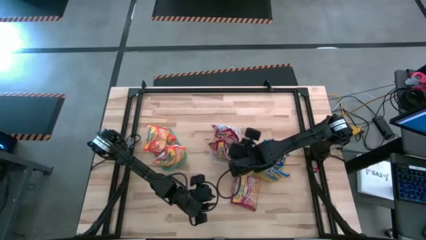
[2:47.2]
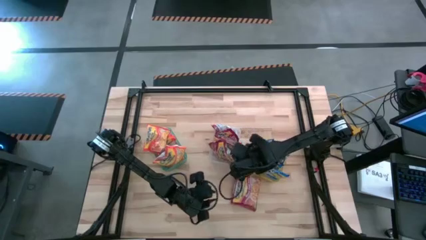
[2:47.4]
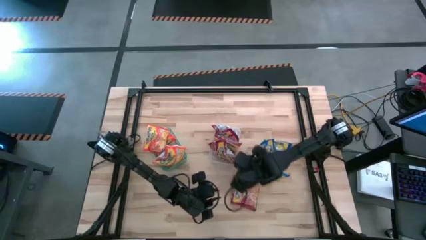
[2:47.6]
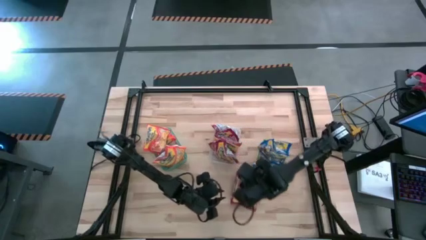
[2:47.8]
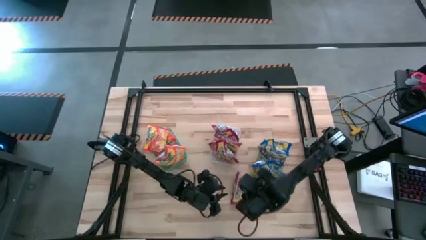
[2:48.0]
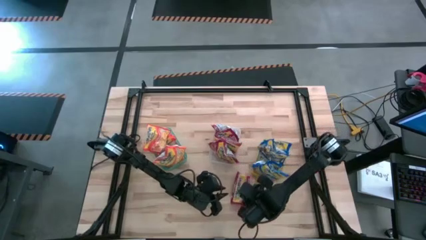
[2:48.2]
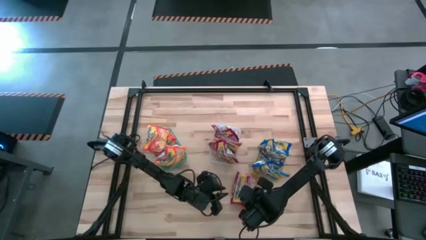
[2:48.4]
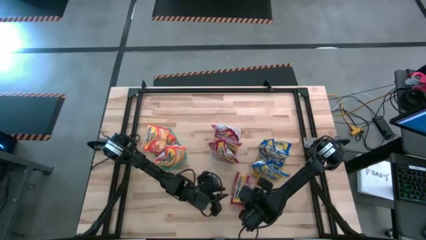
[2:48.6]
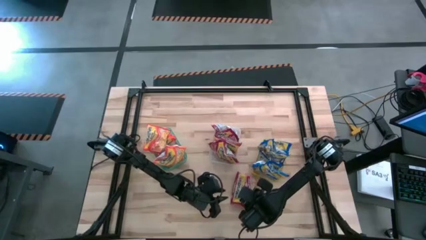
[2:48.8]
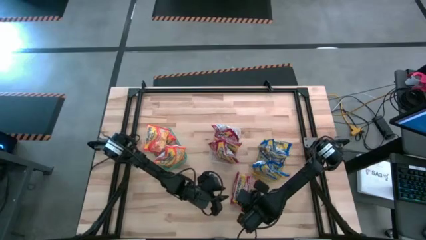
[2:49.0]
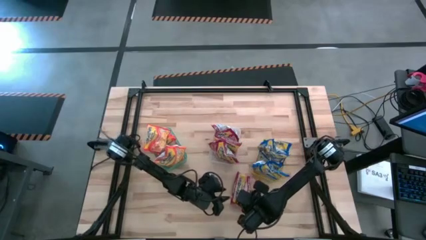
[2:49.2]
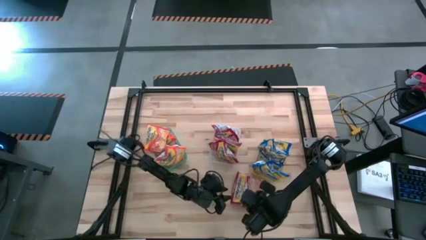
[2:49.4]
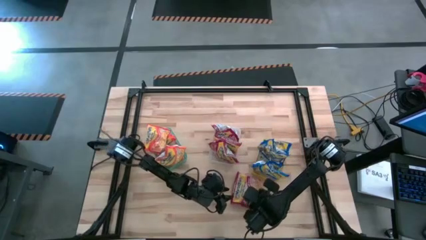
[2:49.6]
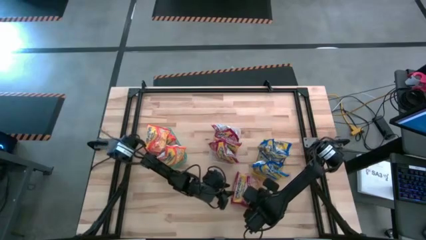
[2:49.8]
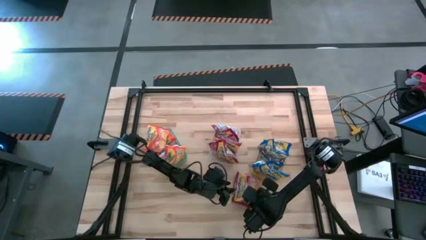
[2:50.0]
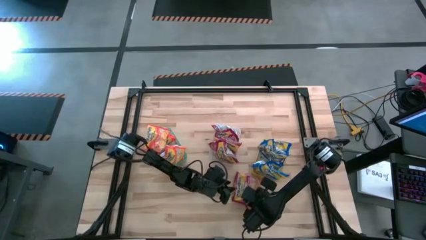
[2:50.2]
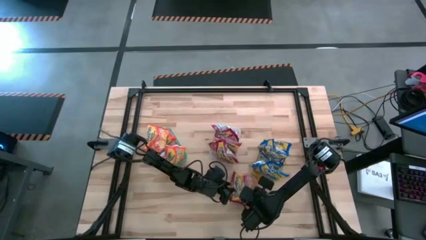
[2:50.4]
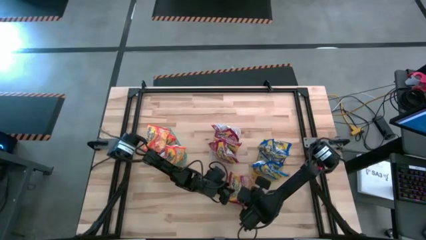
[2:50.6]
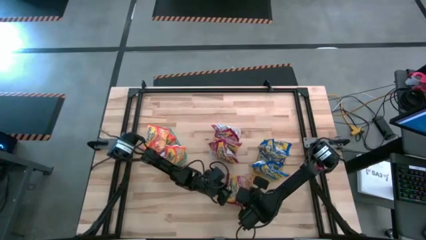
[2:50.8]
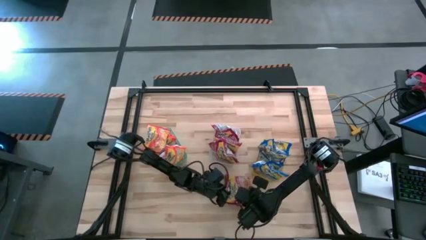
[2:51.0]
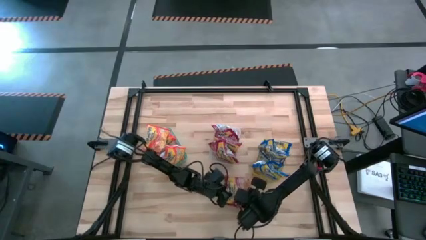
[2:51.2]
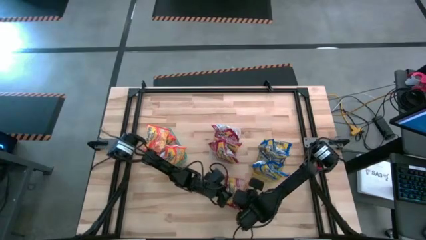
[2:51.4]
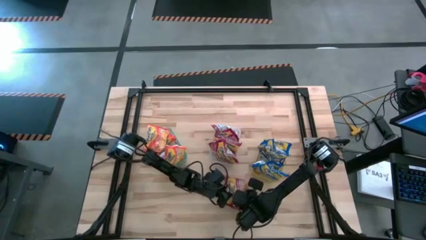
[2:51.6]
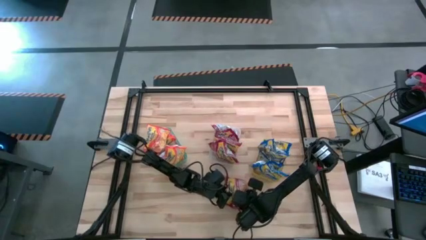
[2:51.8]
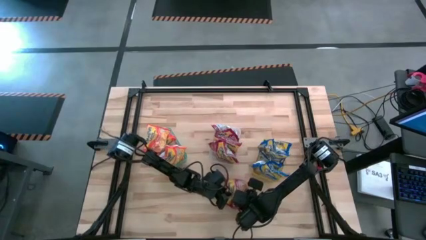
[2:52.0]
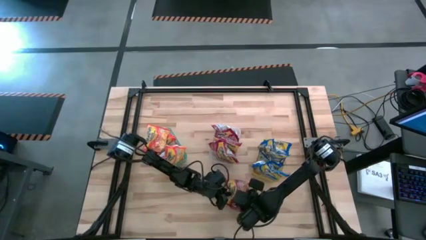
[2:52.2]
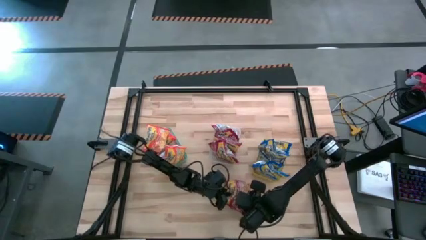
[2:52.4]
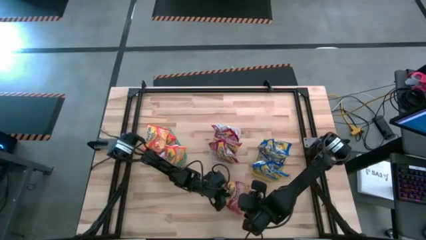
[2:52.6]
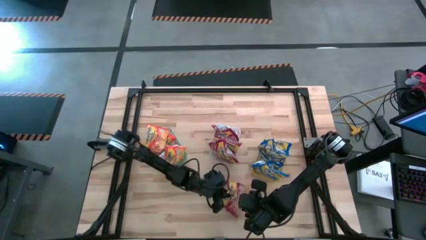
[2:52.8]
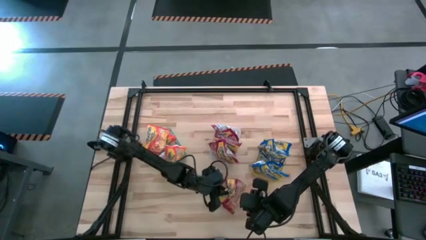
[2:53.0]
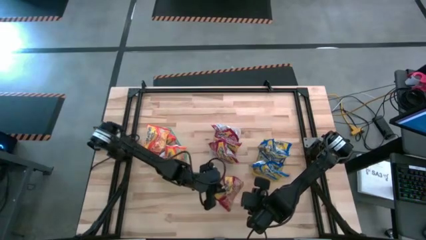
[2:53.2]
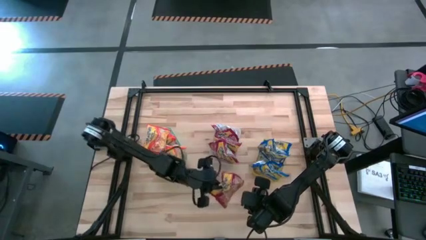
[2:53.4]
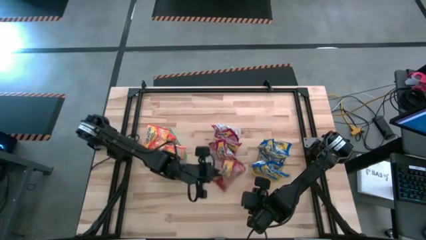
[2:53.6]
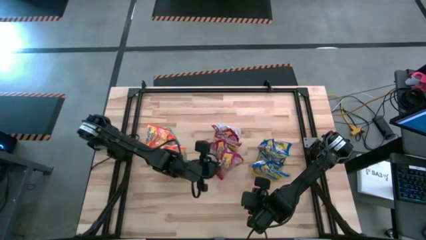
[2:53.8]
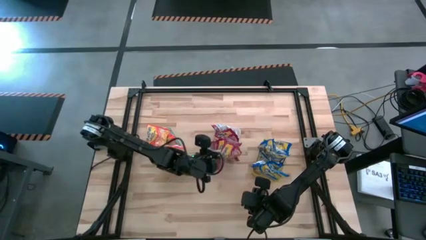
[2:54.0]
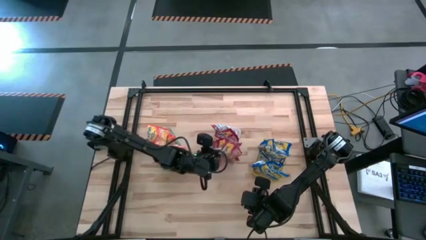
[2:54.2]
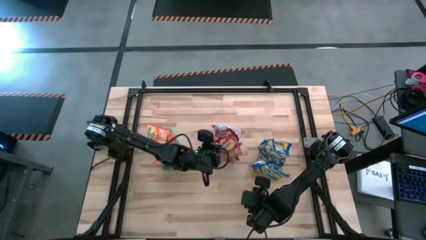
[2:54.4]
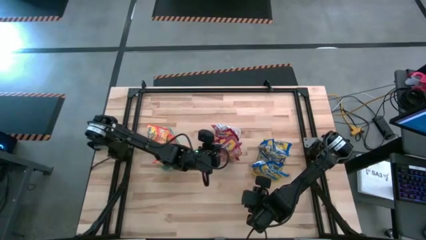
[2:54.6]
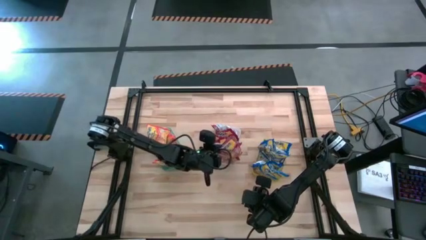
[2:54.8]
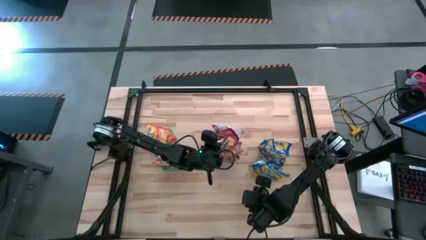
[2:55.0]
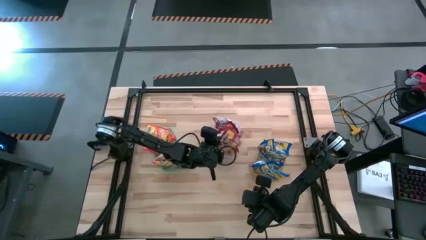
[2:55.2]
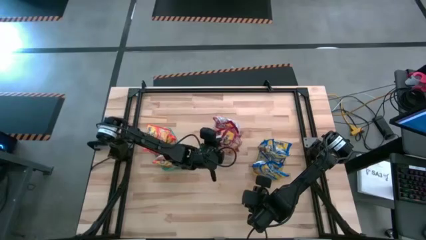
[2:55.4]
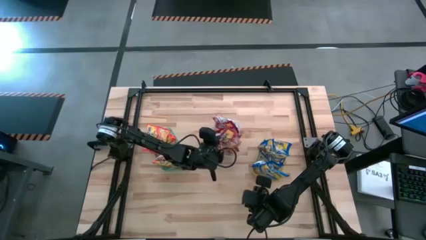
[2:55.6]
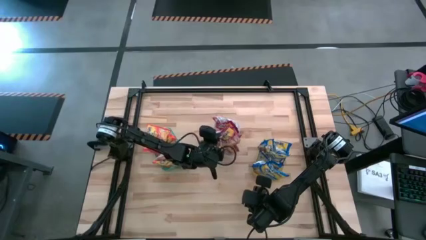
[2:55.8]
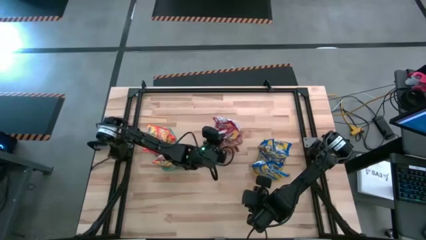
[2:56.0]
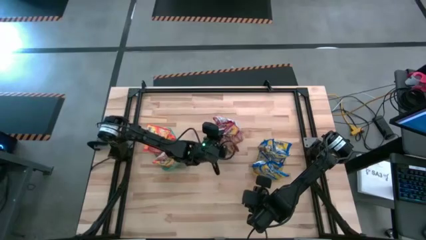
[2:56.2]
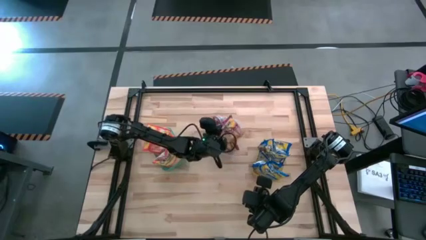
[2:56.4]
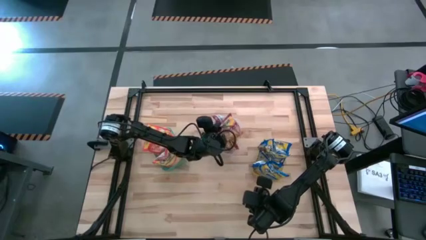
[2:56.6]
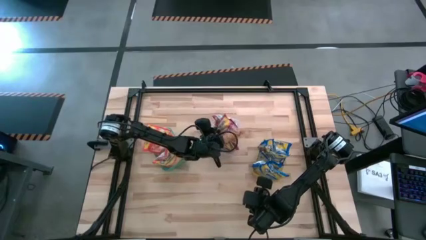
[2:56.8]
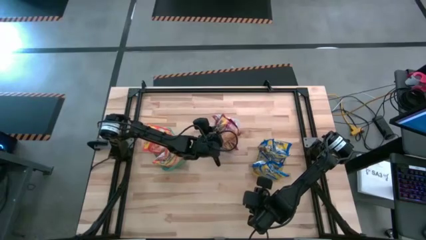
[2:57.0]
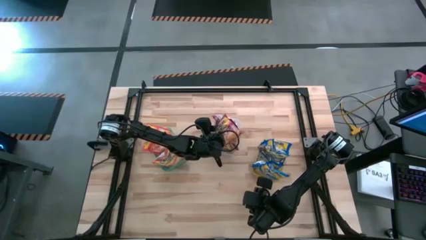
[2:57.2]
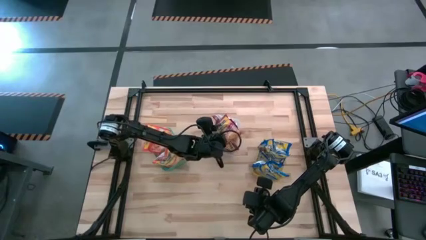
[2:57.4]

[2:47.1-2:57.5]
Task: Sort Maruchan noodles
Put the red noodle pack into the white bin

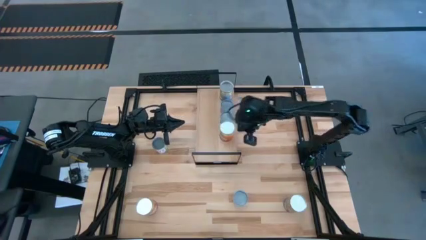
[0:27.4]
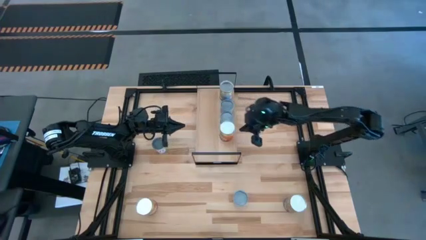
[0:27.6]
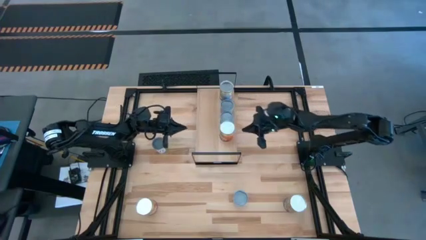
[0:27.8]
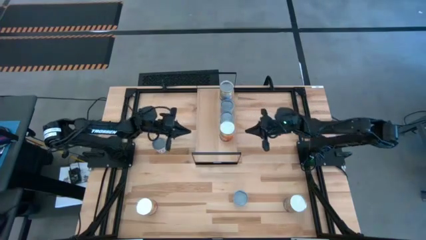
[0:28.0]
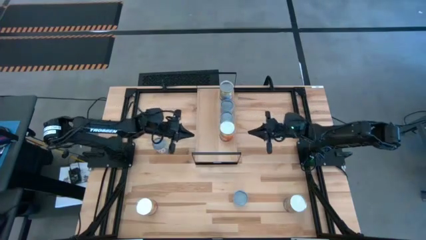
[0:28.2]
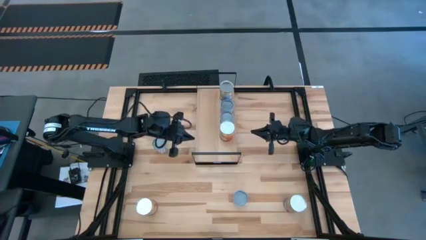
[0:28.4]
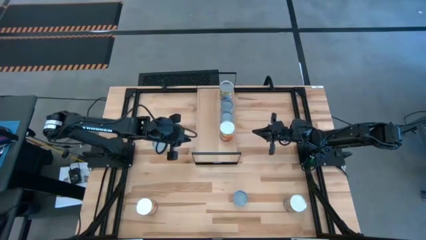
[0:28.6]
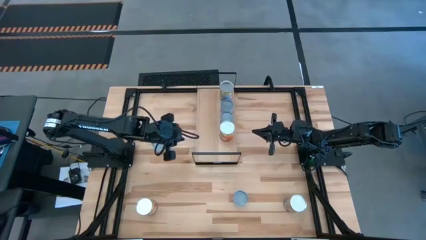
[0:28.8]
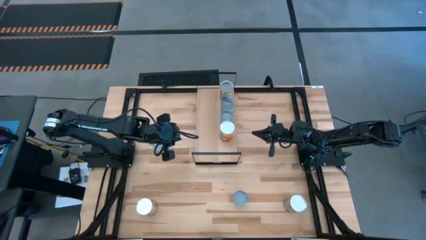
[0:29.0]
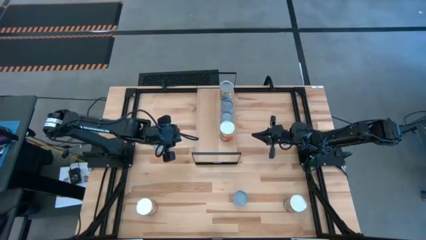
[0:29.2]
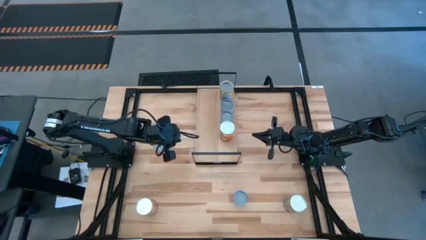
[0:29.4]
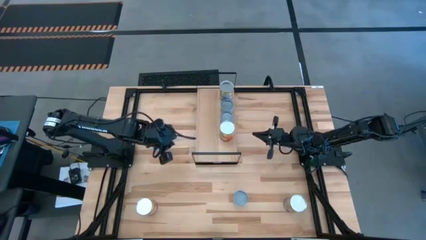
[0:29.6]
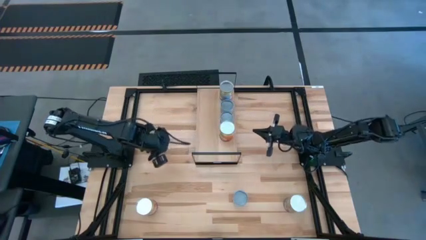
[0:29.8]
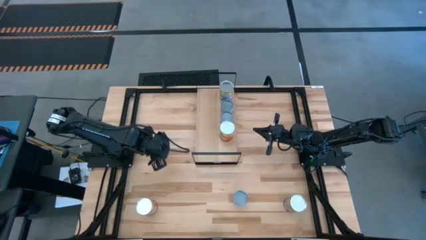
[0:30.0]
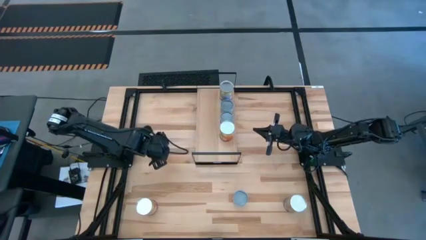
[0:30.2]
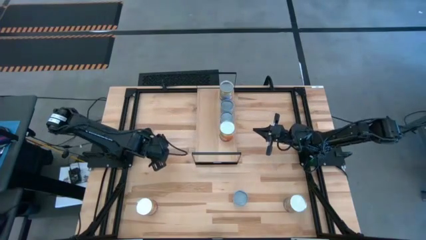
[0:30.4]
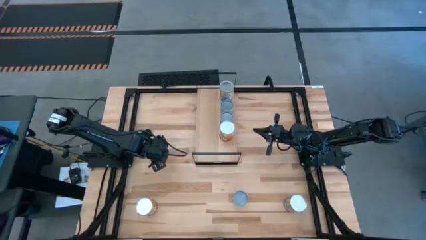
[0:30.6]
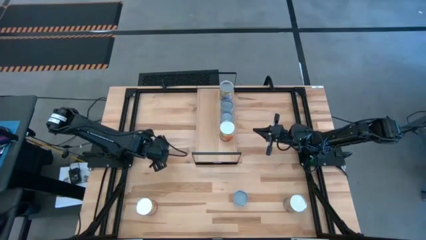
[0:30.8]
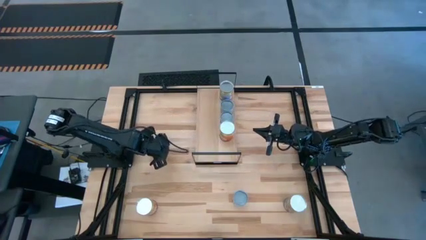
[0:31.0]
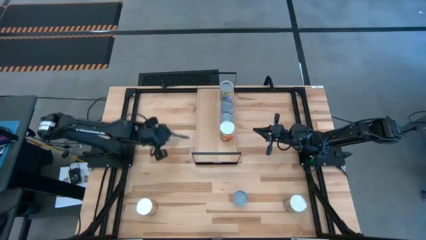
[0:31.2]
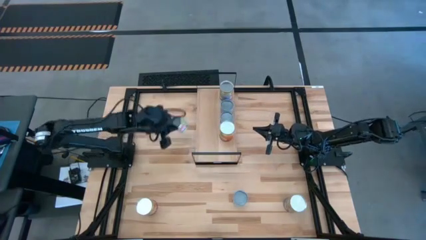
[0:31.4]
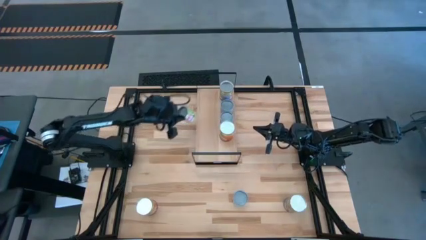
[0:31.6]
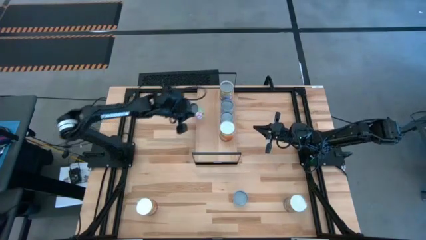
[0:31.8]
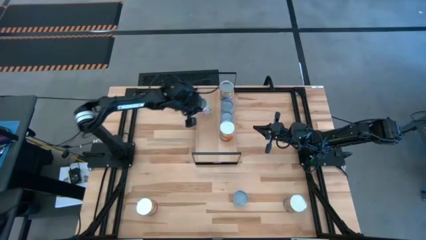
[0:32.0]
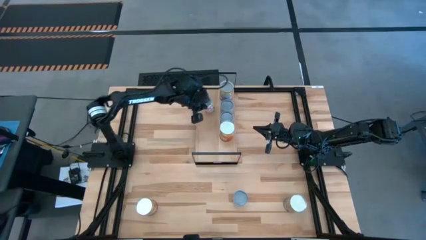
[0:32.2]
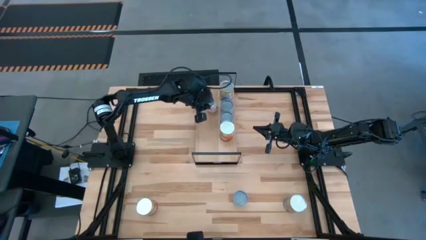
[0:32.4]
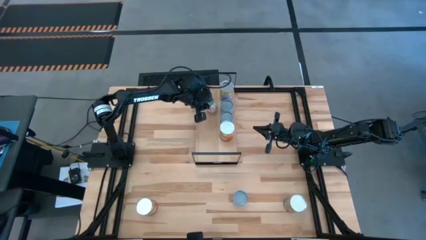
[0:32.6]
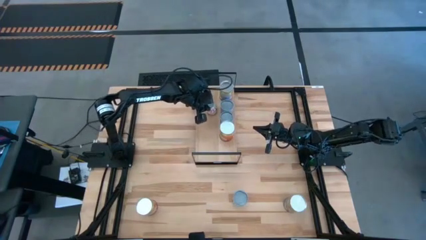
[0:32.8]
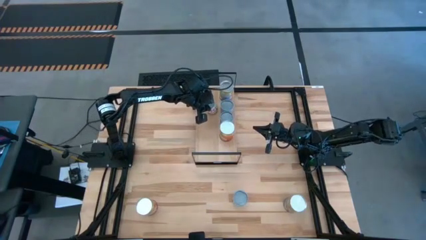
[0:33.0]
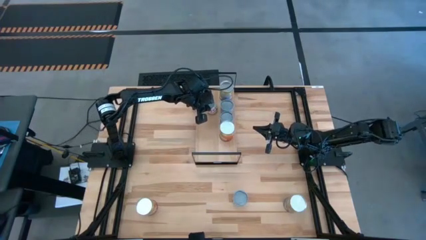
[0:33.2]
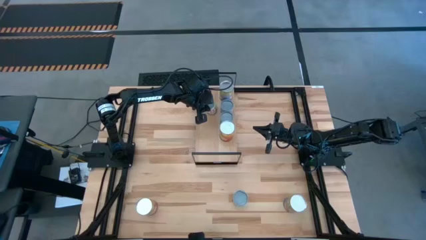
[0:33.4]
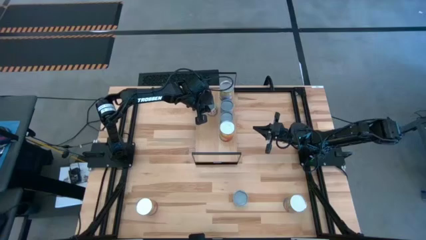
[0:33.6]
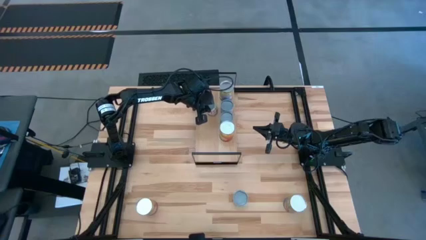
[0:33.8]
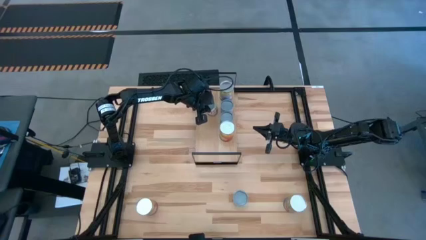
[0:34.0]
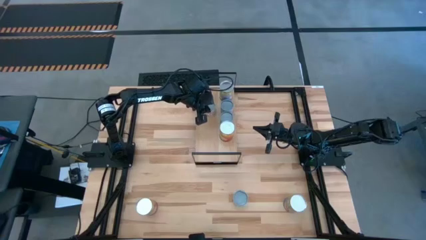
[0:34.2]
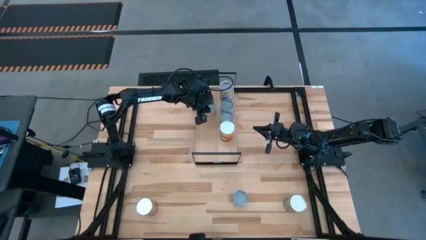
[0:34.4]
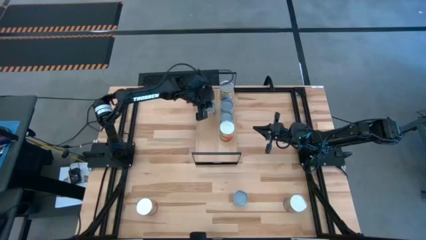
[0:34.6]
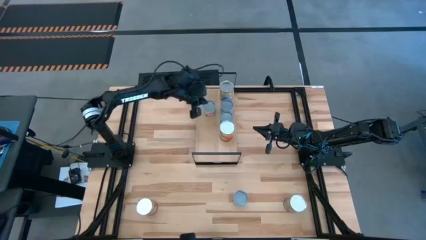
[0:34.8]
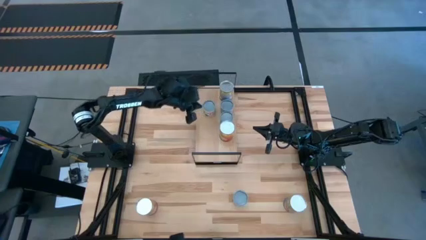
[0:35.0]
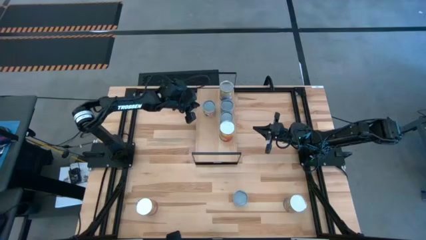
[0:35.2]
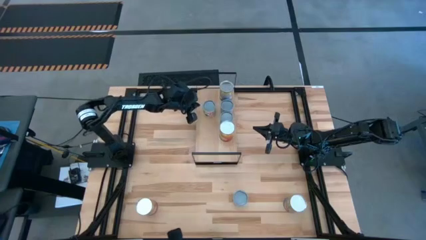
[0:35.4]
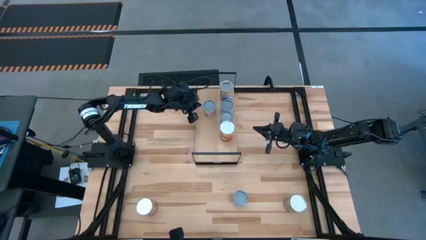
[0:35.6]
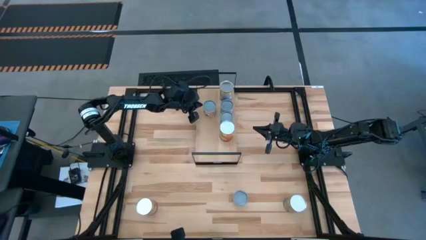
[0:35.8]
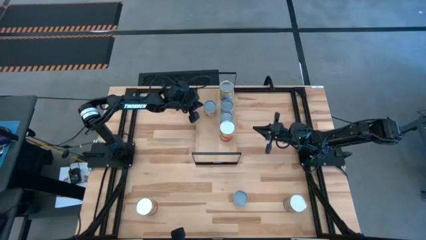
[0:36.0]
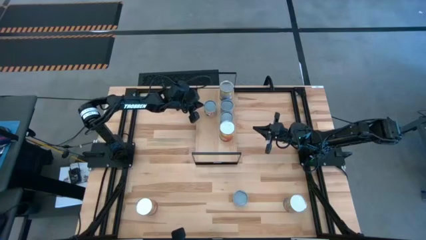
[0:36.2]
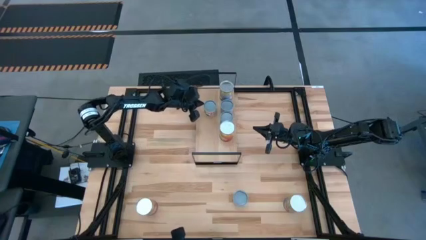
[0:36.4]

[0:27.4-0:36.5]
Task: Pick and place cans onto a shelf
Put the green peas can on the shelf
